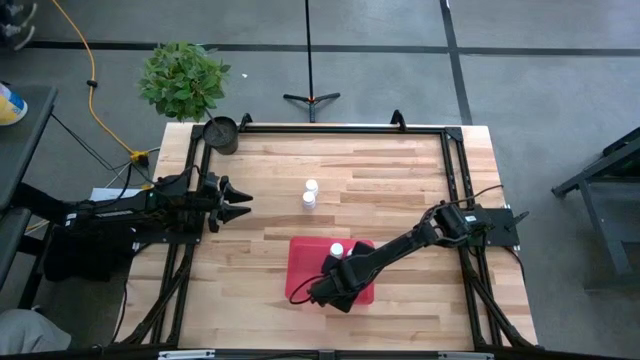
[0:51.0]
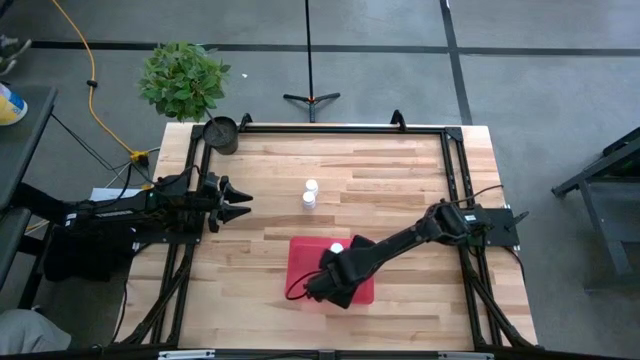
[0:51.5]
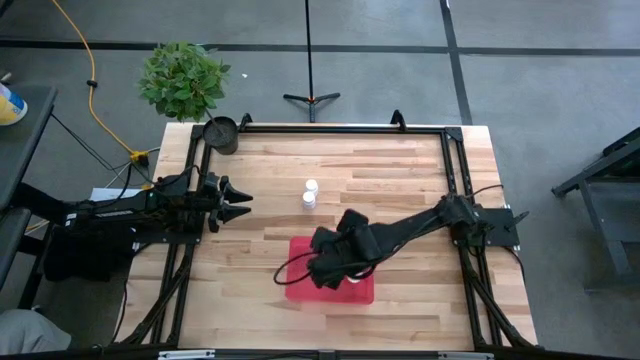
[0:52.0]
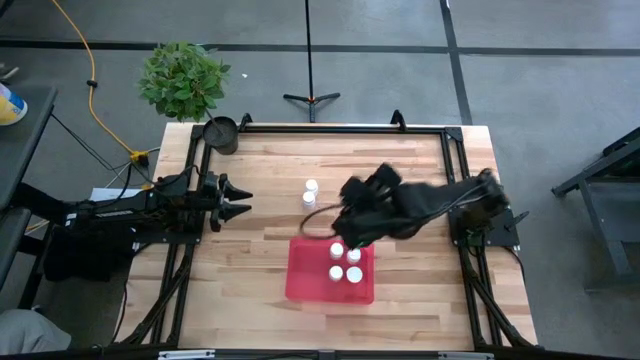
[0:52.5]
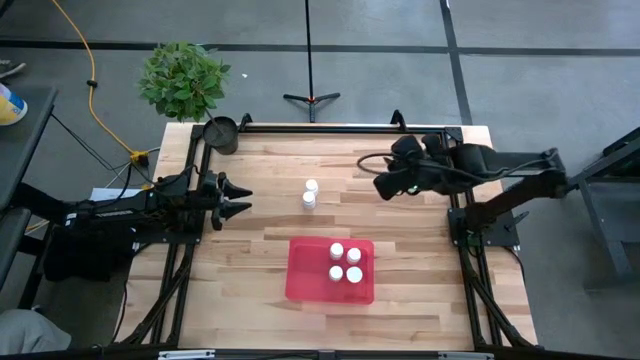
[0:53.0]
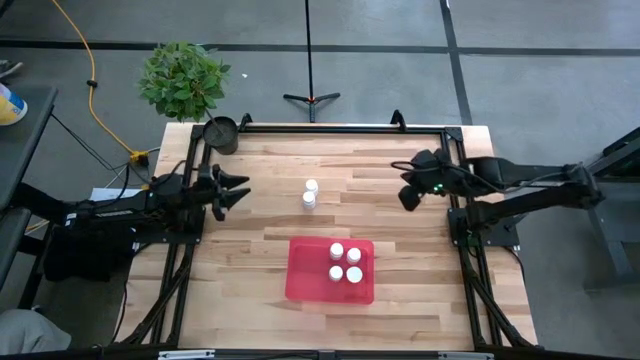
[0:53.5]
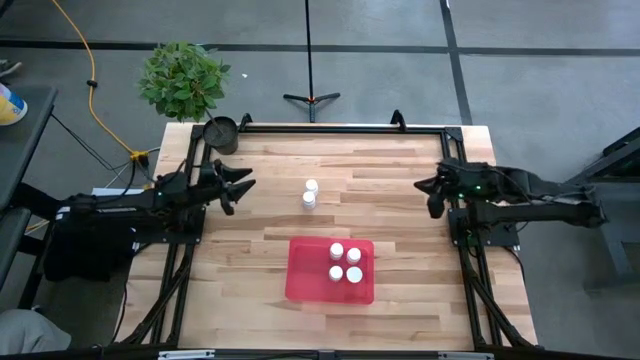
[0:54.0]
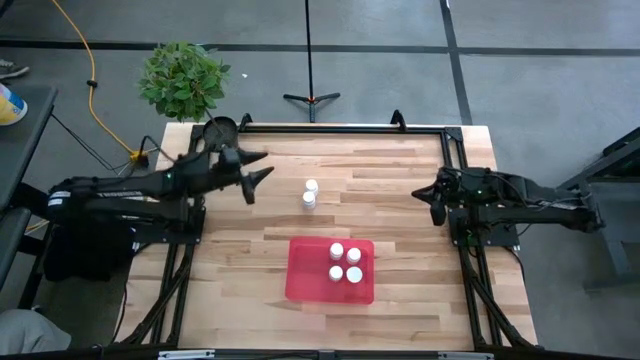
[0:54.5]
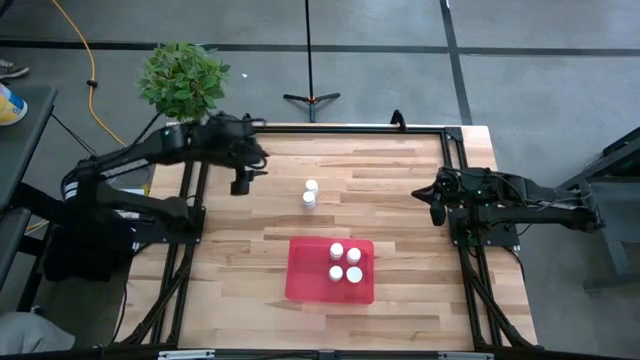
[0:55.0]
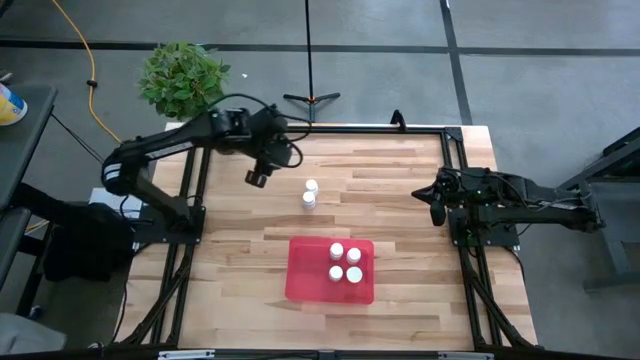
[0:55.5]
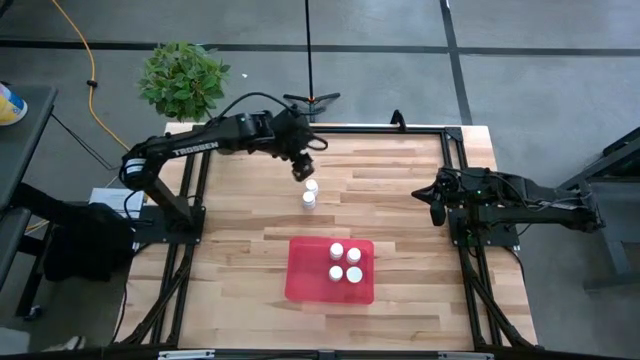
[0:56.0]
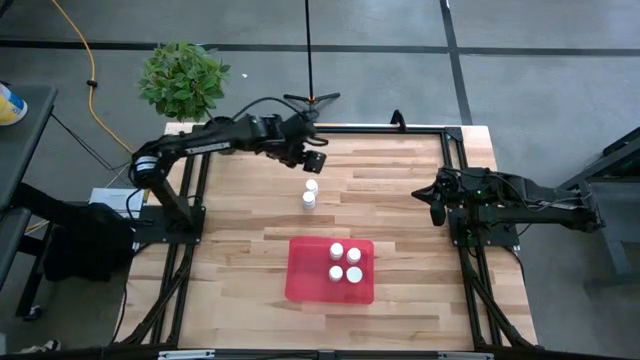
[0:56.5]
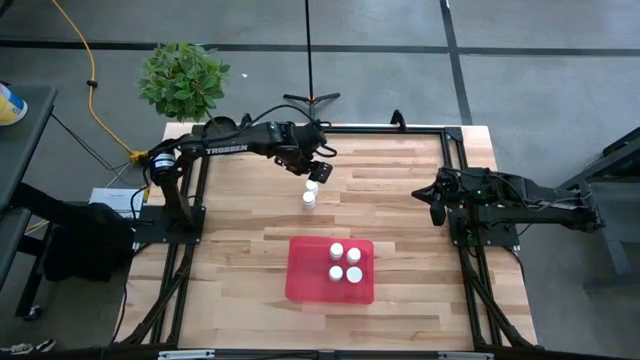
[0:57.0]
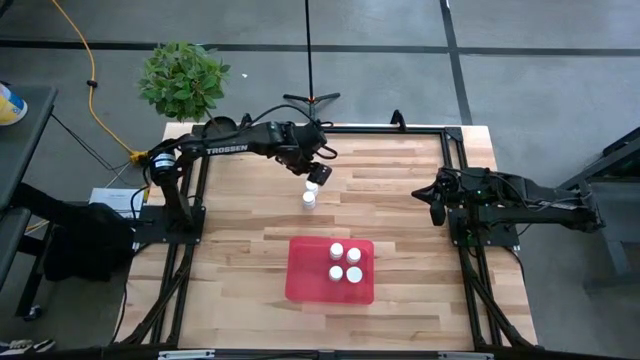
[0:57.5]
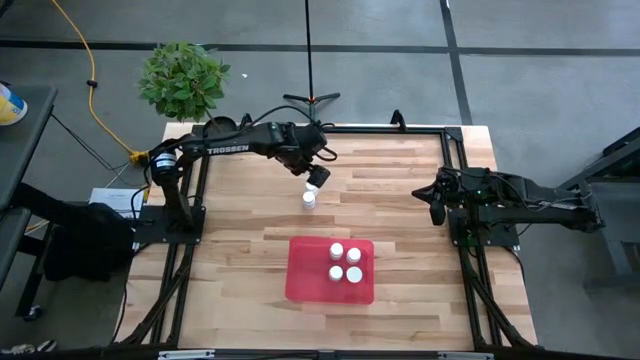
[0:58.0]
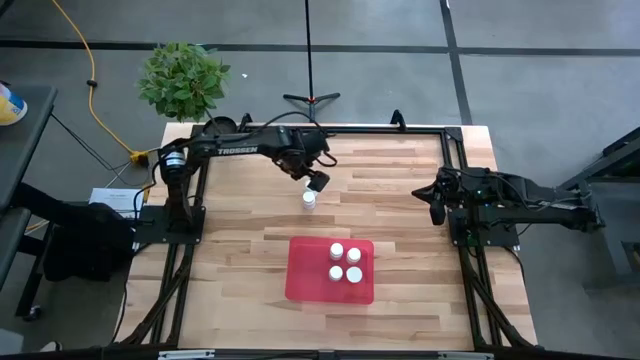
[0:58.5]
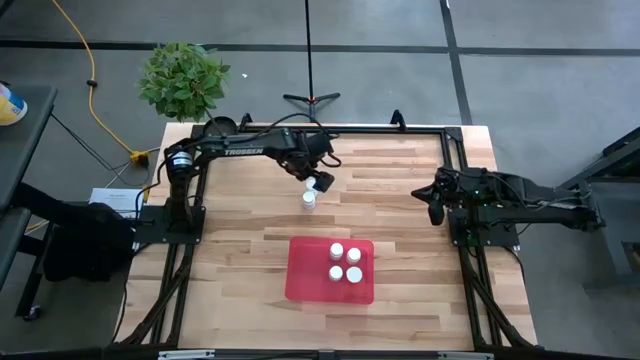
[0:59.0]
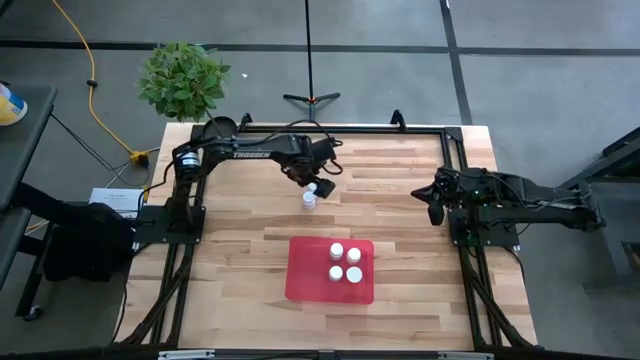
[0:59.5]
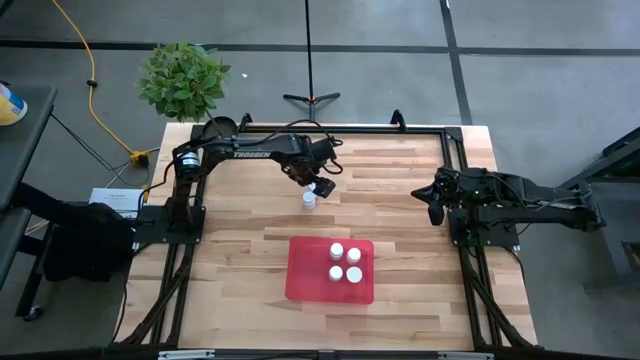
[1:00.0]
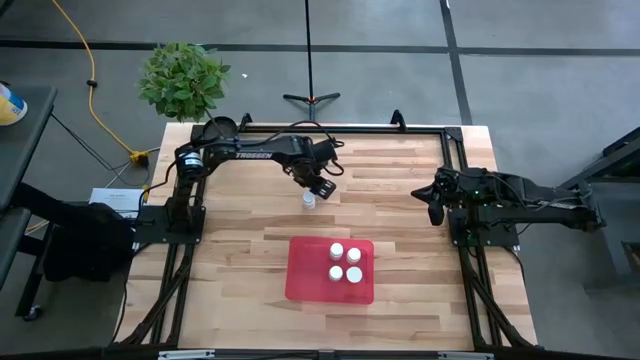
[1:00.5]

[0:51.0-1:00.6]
Task: Pick and place pill bottles into a basket
Put the top white pill bottle into the bin

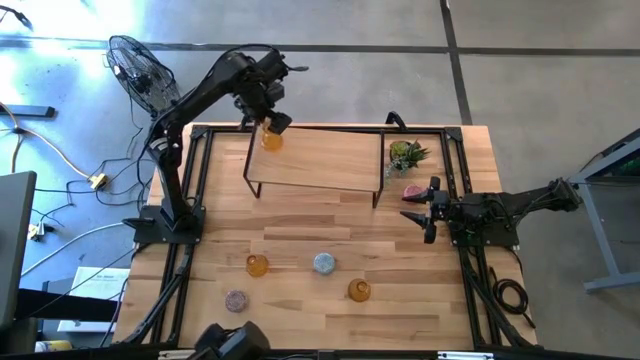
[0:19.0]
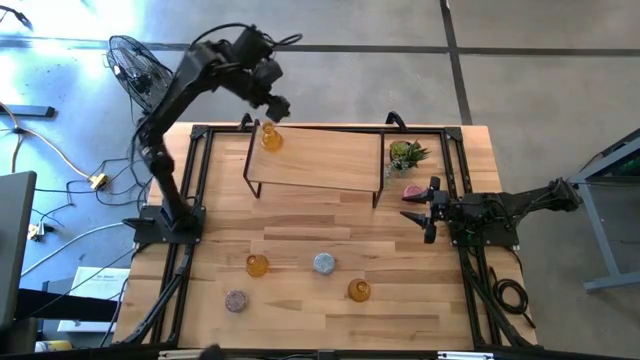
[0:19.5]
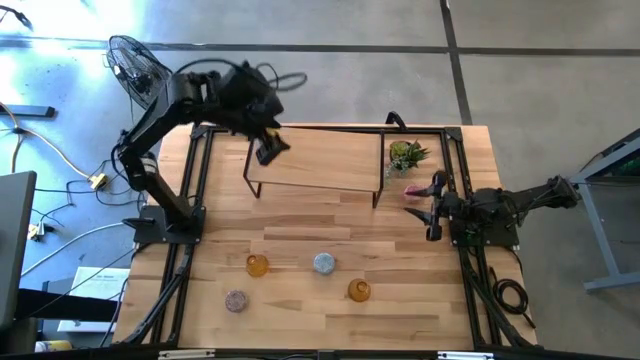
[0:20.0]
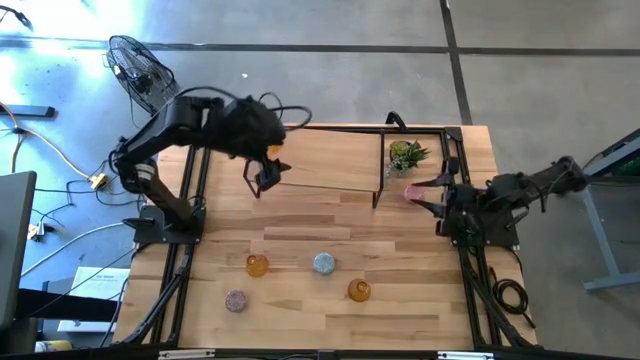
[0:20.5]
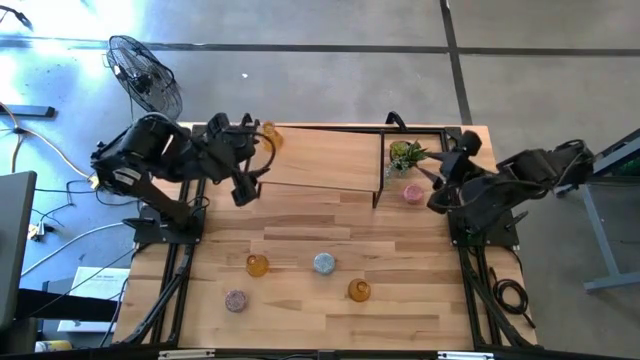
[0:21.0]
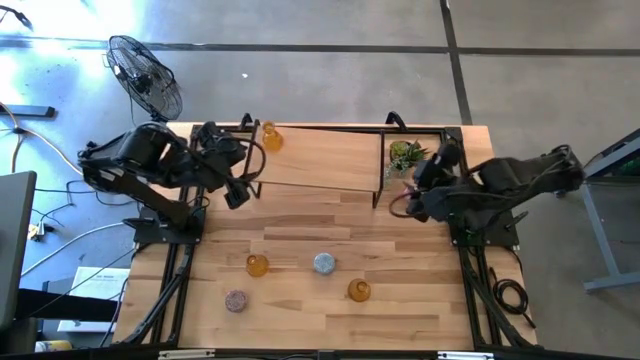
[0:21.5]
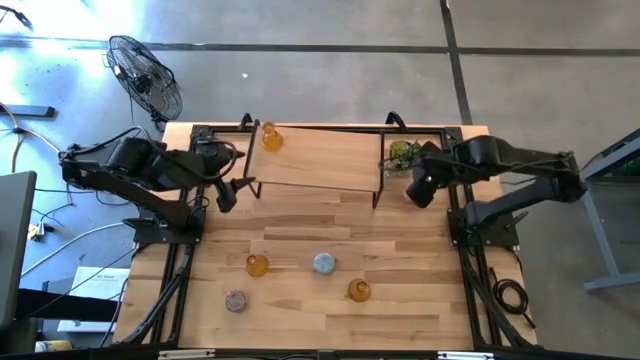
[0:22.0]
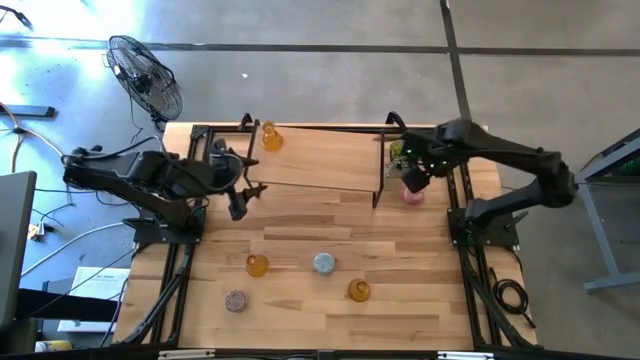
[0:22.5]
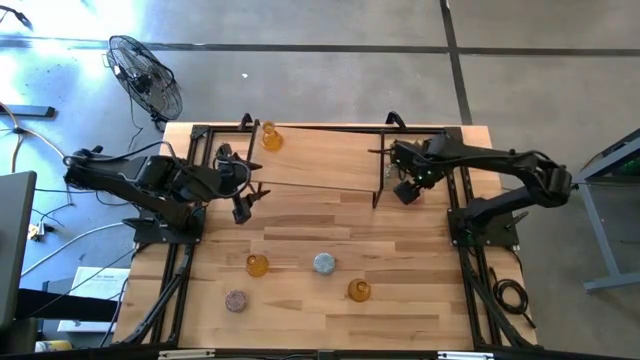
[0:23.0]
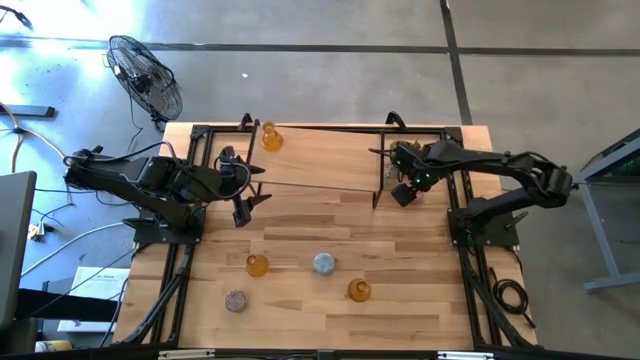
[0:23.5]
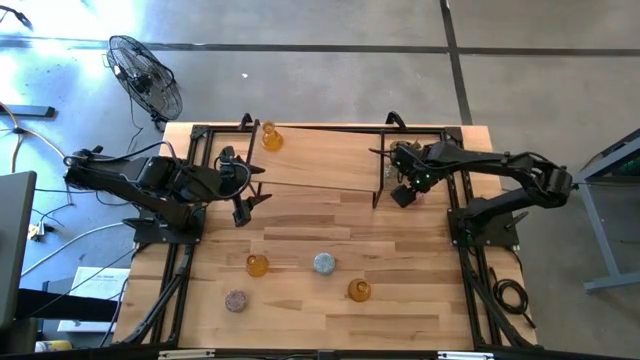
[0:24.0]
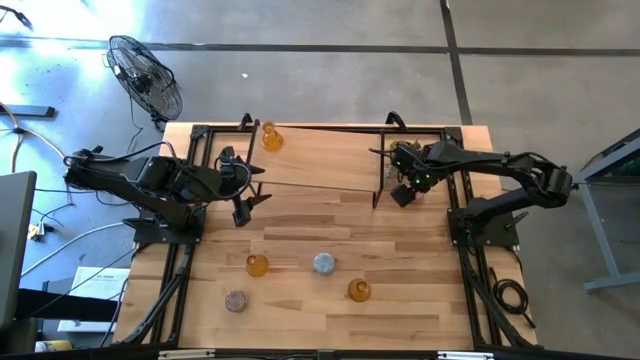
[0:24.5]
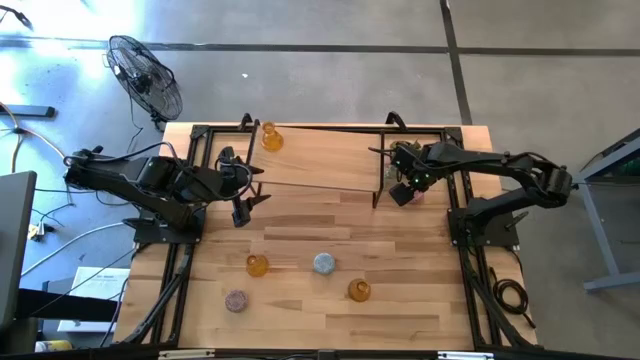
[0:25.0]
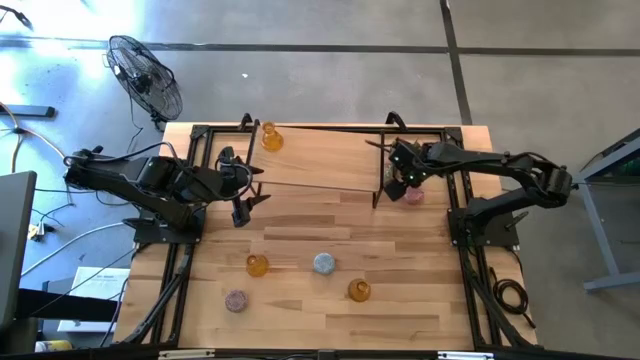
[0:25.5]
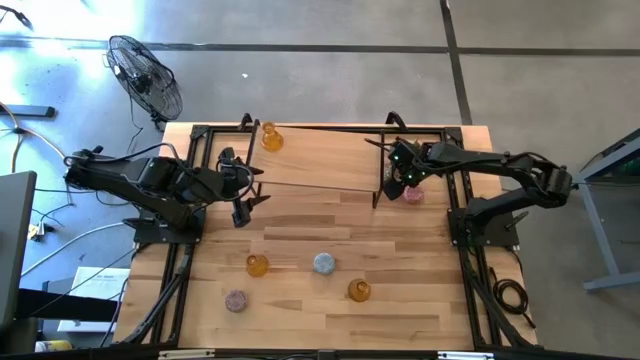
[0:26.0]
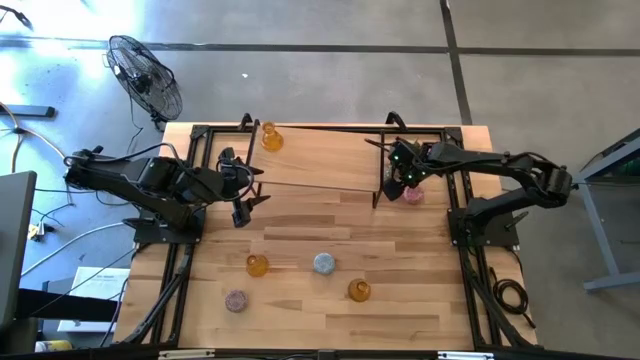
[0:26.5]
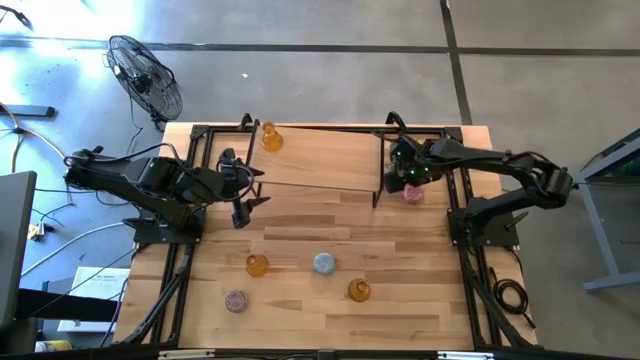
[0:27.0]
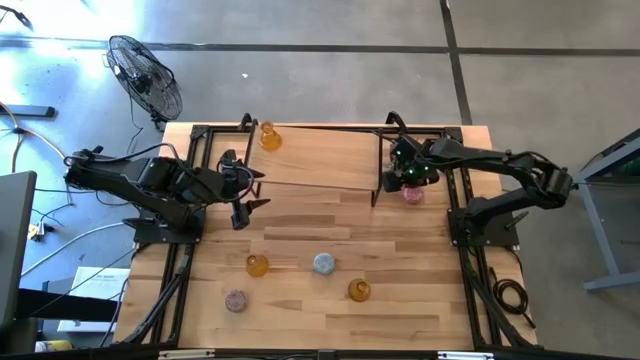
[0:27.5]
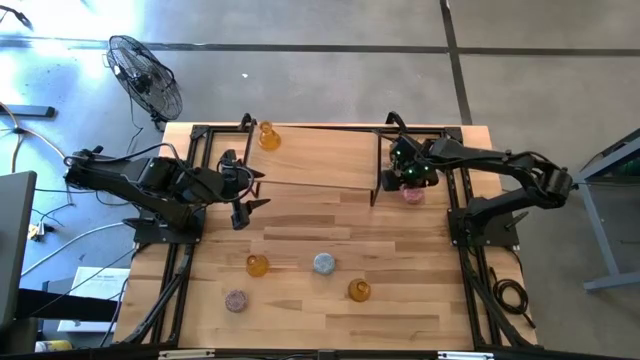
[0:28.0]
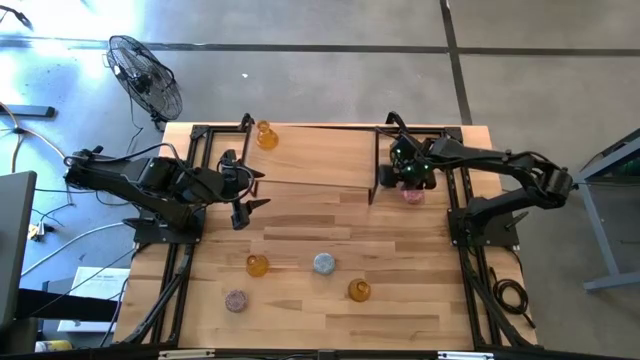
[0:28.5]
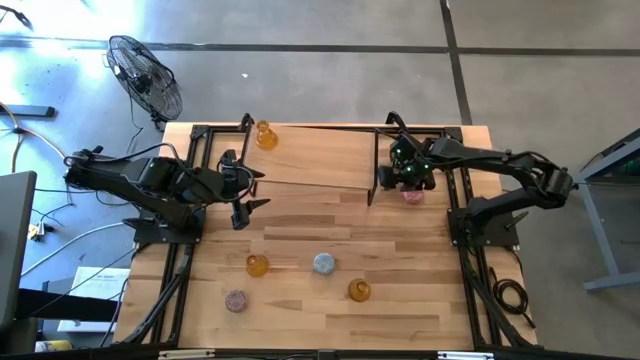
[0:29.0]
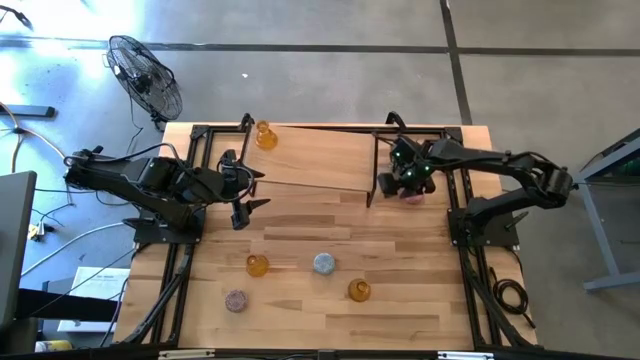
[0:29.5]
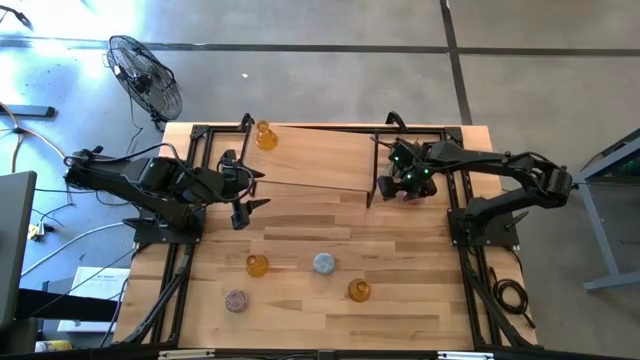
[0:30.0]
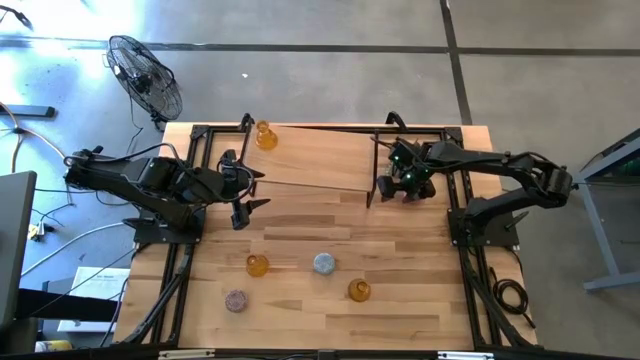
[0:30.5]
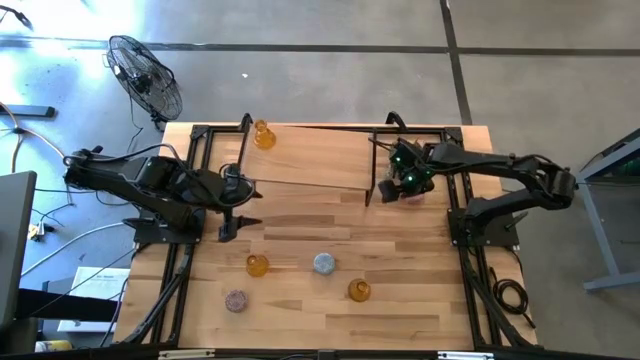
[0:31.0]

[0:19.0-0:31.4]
Task: Pick & Place candle stick holders
Put the pink scented candle on the shelf
